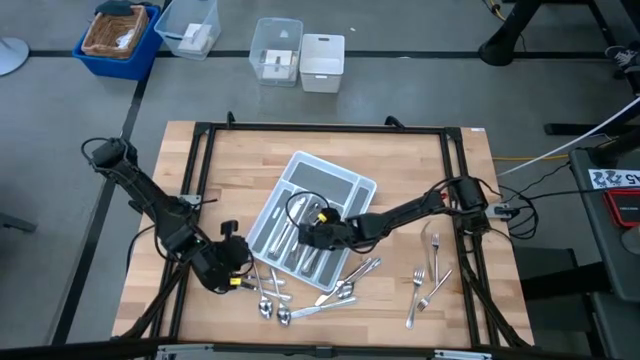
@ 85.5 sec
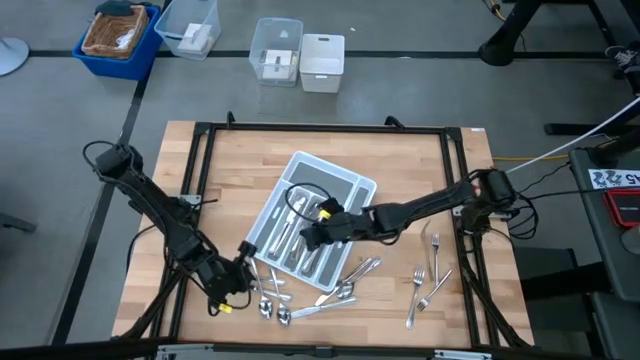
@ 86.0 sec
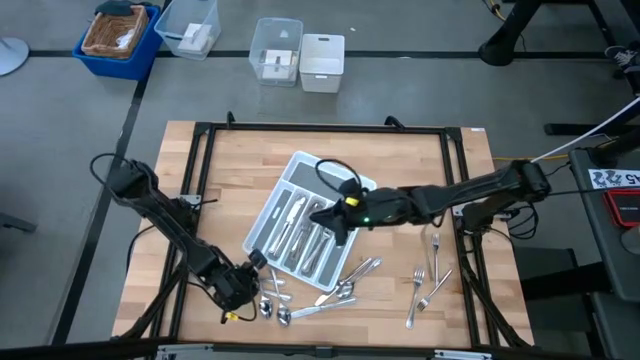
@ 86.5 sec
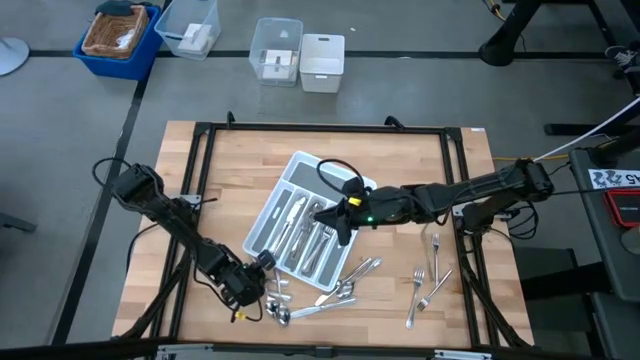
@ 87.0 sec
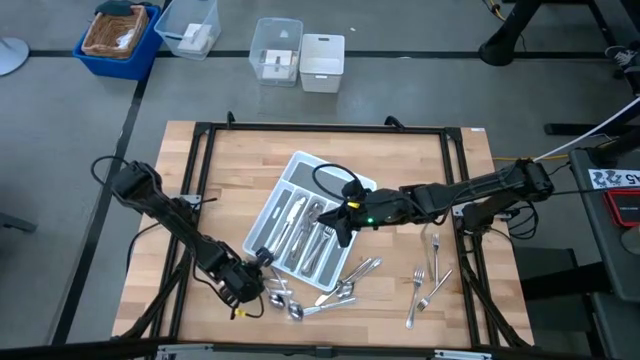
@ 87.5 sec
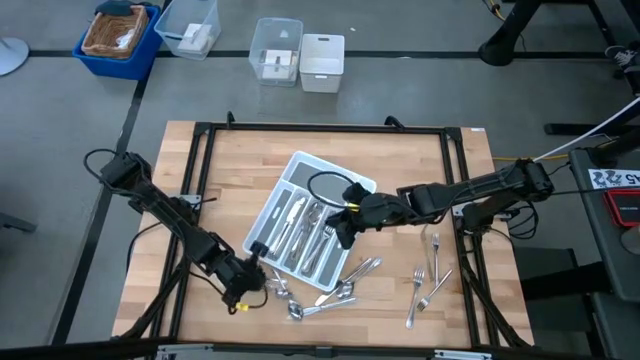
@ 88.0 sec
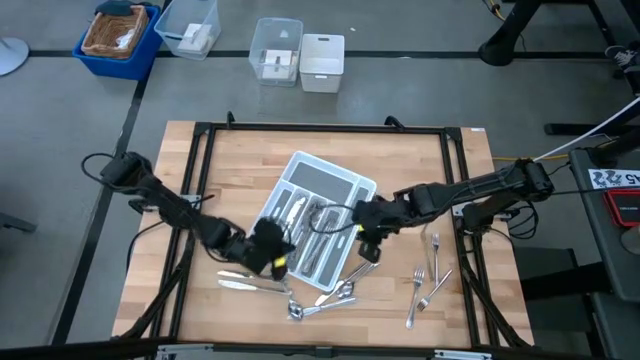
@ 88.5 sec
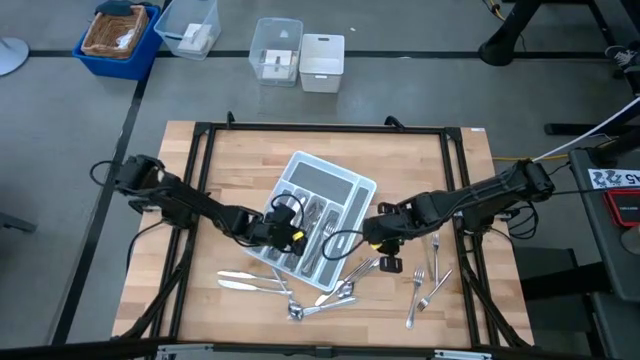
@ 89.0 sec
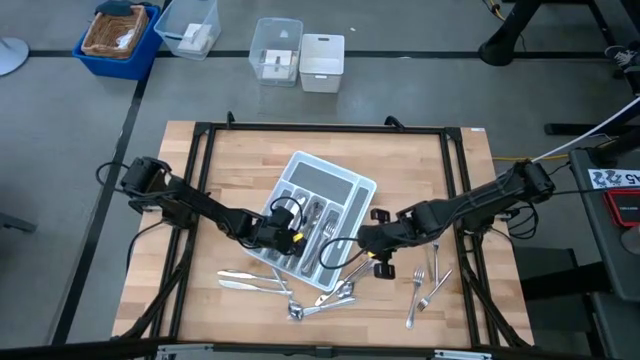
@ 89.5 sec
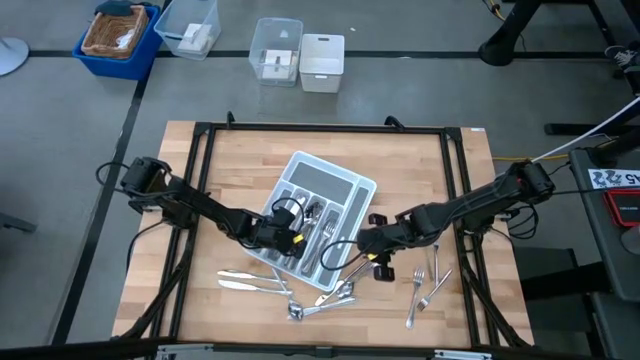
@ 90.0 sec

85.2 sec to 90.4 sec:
Task: Sort silverware
Put the silver spoon into the white cutlery tray

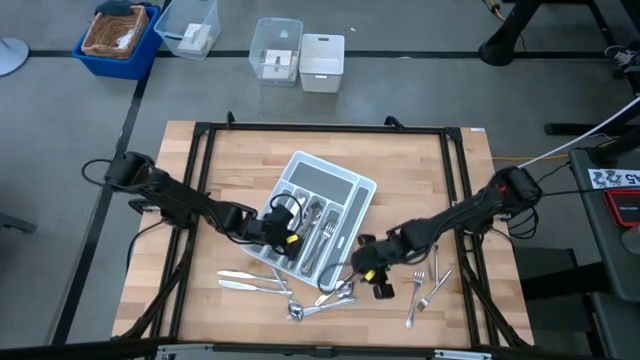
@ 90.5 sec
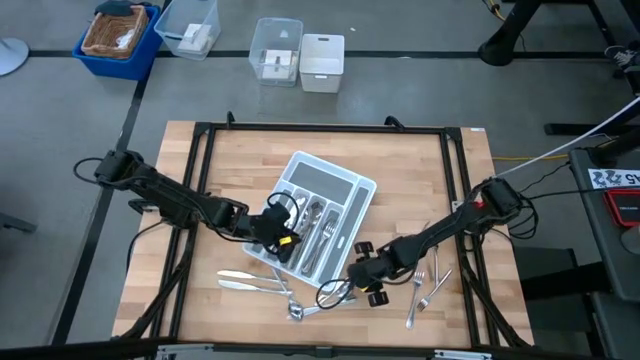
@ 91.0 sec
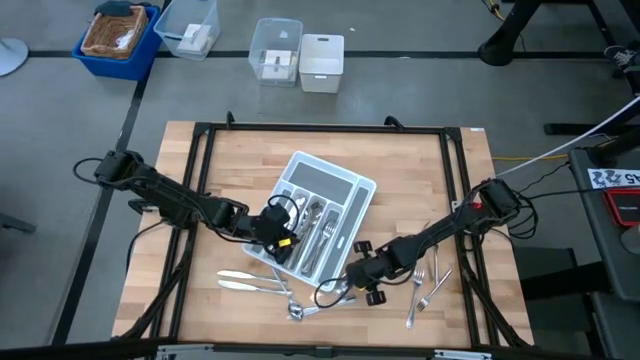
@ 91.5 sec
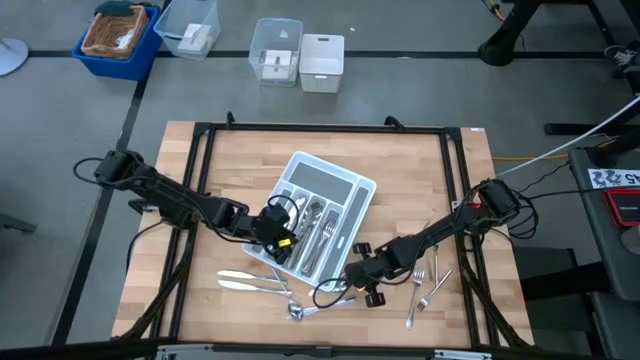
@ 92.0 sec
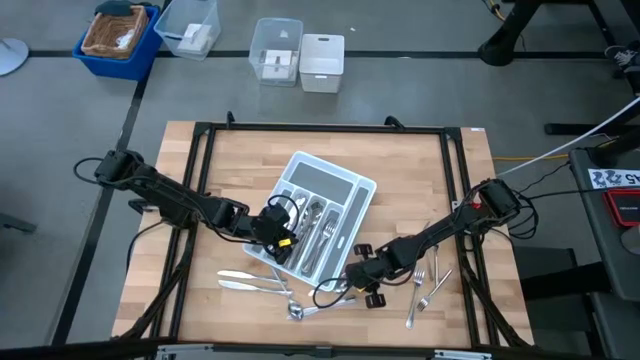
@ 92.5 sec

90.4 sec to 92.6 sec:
Put the silver spoon into the white cutlery tray

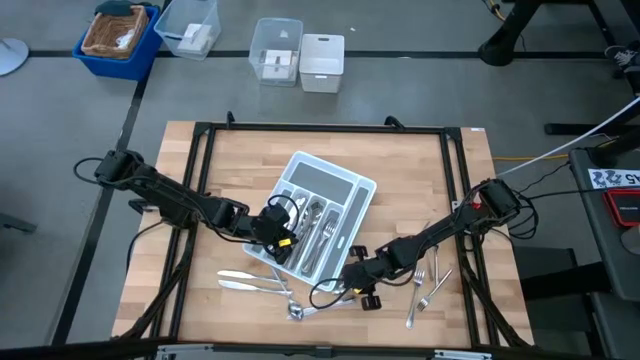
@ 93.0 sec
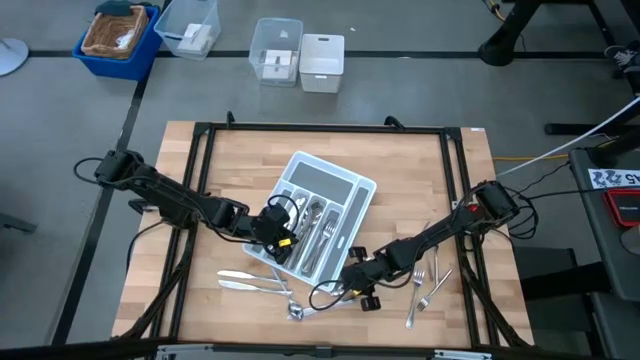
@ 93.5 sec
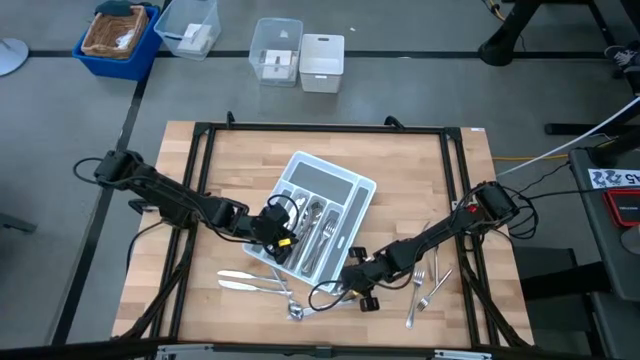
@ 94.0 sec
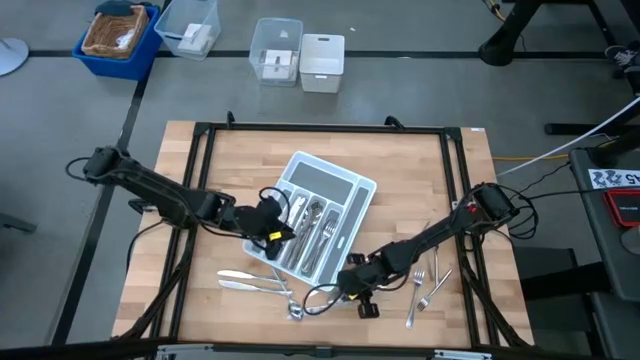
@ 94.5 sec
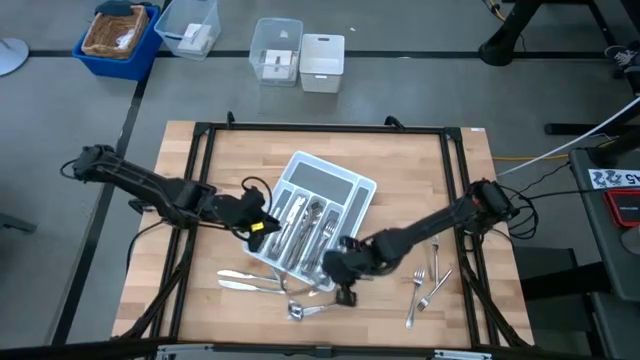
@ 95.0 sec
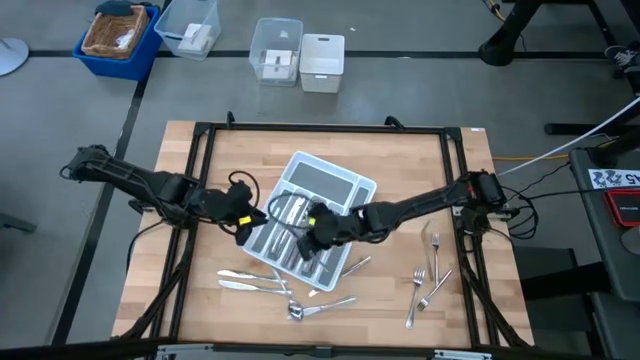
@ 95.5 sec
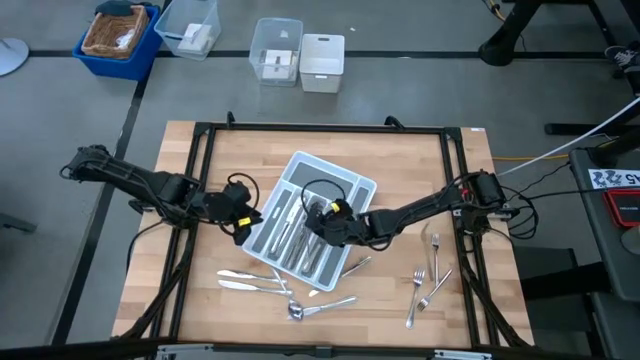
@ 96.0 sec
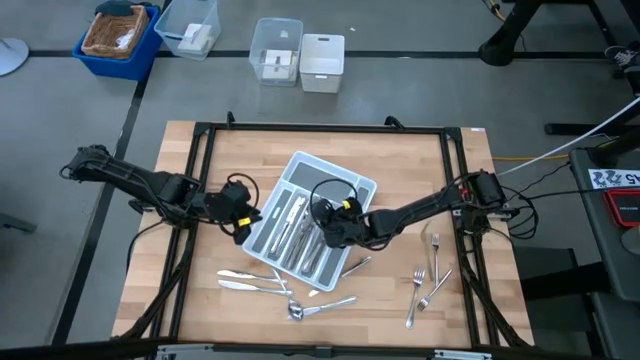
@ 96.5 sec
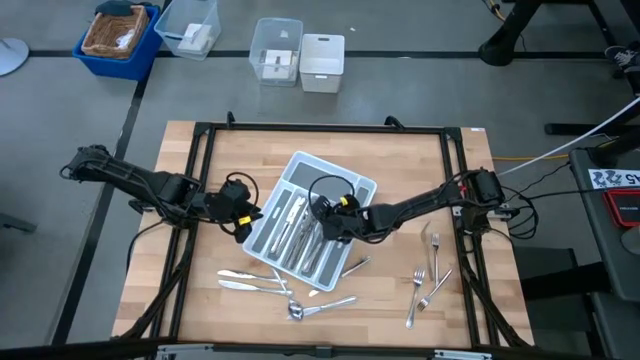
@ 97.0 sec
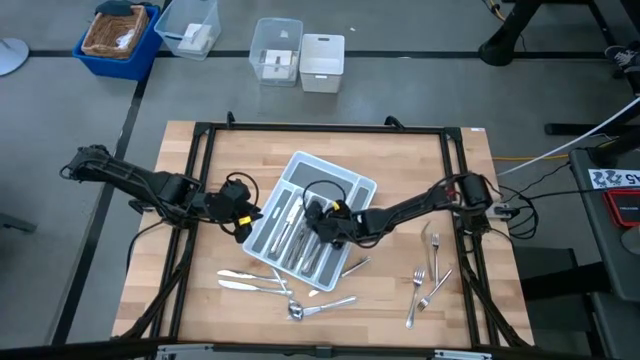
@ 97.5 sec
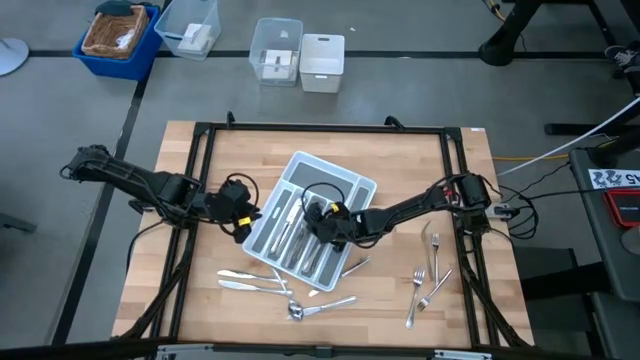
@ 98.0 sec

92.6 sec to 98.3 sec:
Put the silver spoon into the white cutlery tray

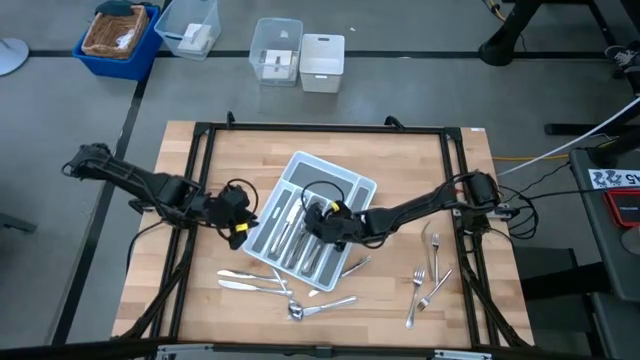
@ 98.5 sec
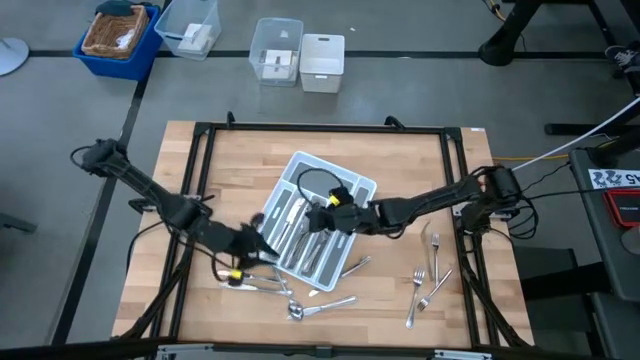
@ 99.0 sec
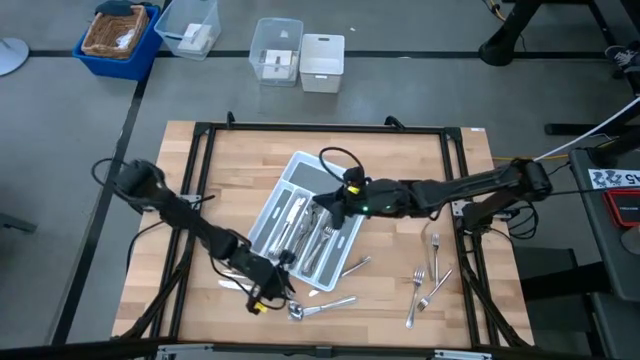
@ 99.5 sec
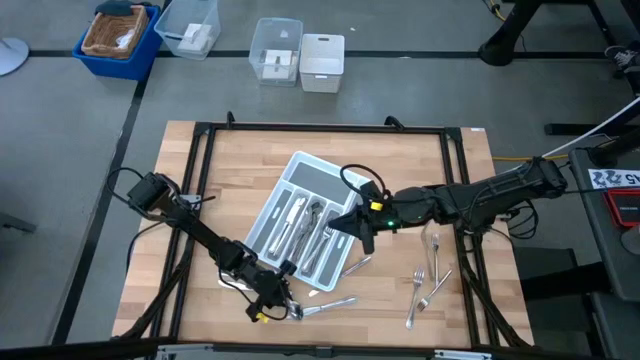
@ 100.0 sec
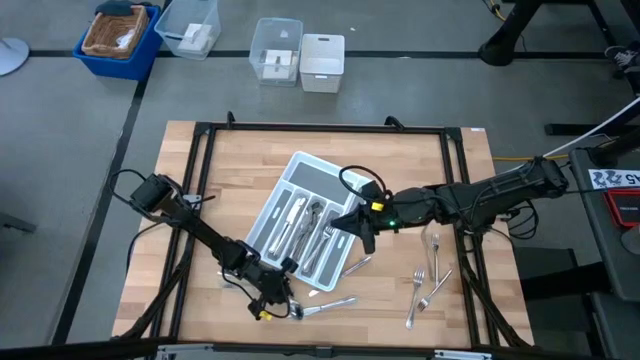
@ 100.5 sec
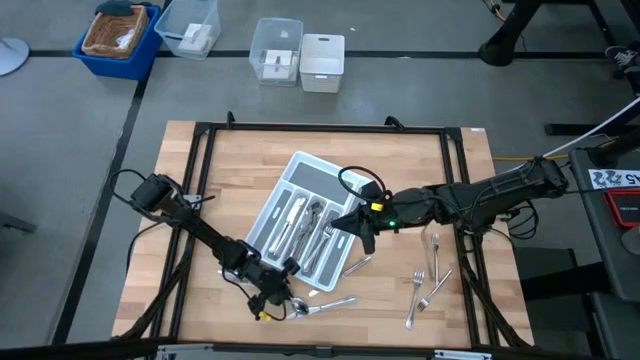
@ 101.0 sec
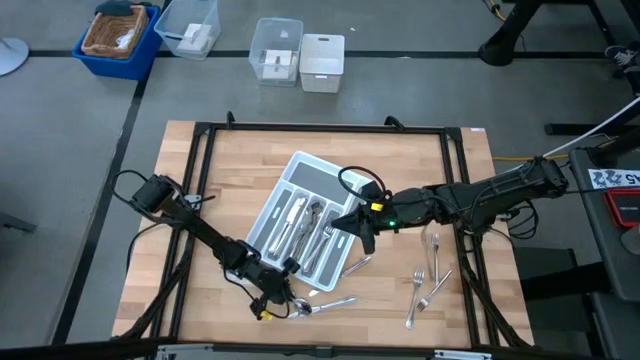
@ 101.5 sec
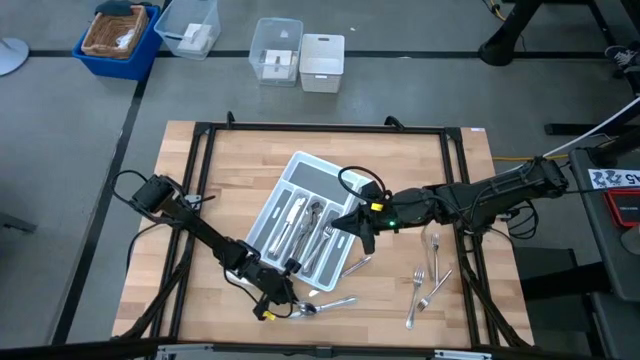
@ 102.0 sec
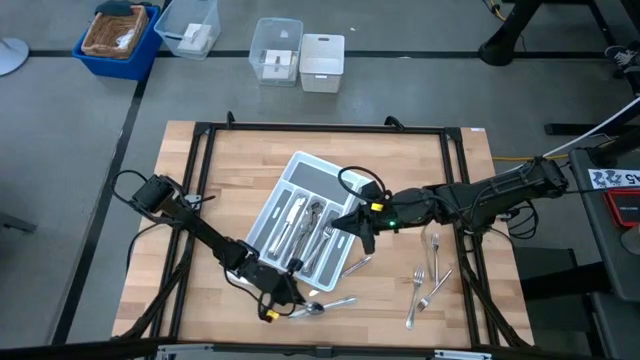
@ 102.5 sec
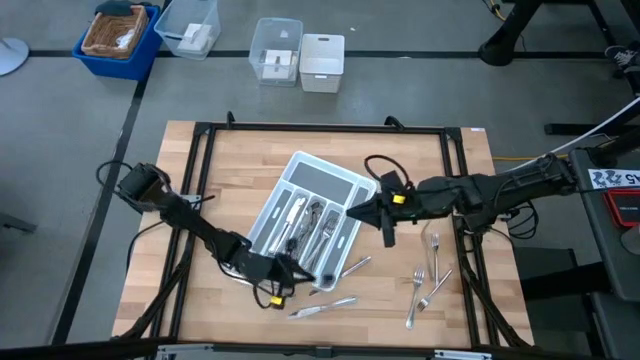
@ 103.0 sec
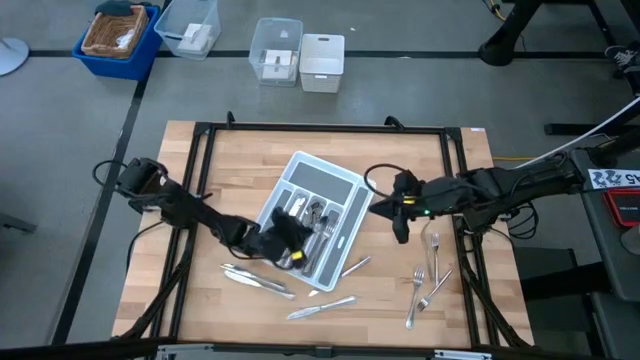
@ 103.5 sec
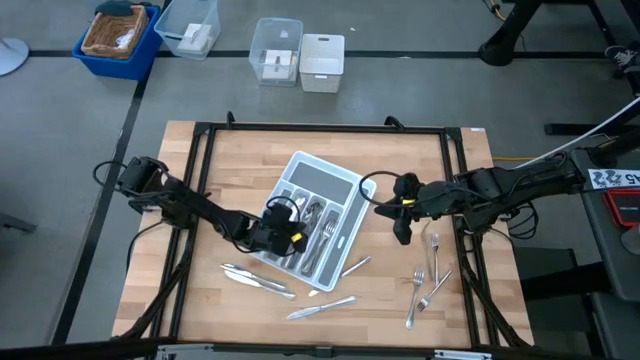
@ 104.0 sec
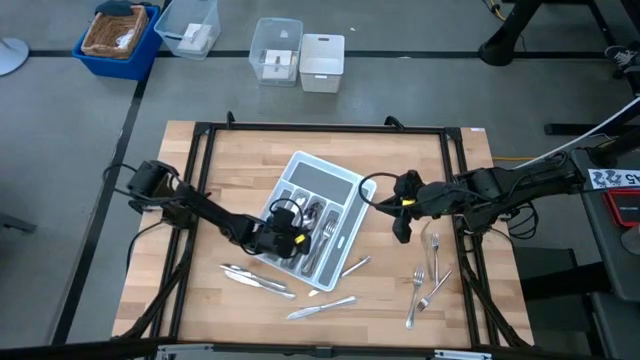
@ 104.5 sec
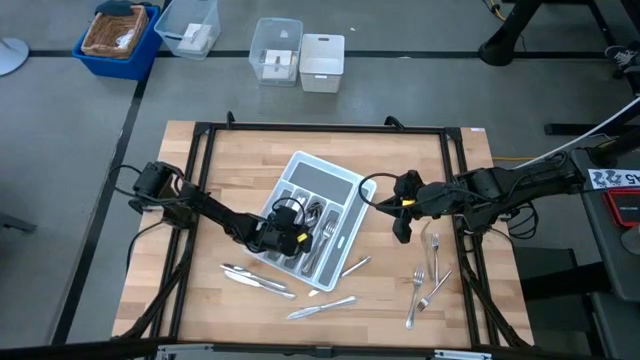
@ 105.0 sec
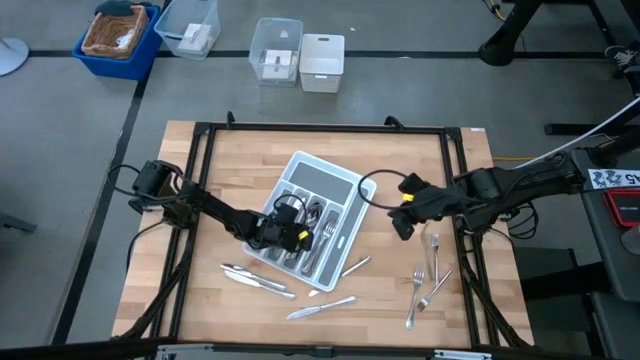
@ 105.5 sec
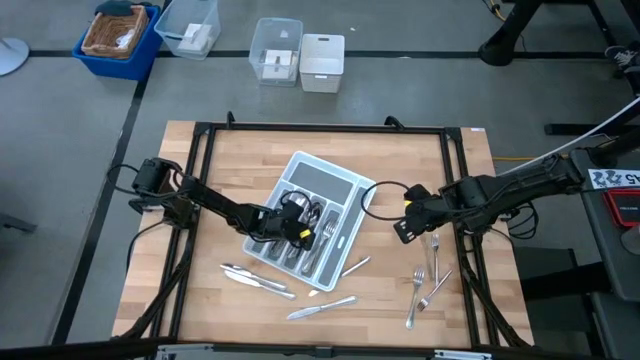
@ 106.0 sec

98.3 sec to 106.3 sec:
Put the silver spoon into the white cutlery tray
